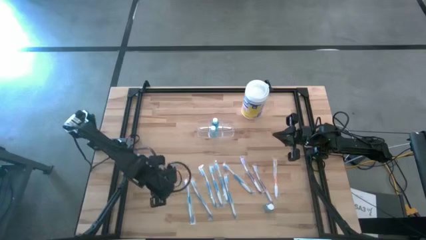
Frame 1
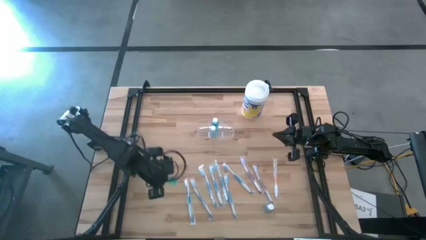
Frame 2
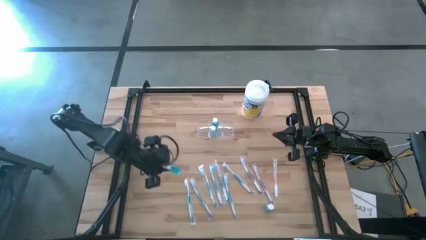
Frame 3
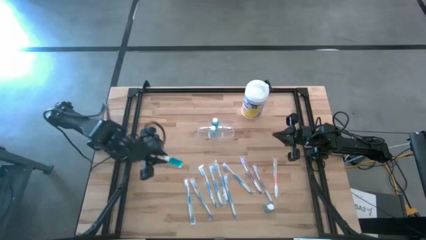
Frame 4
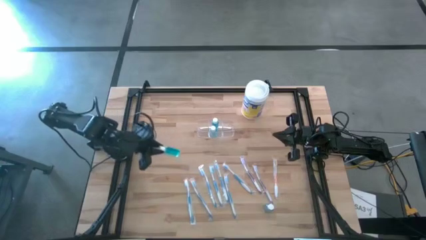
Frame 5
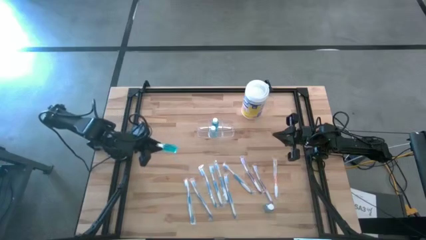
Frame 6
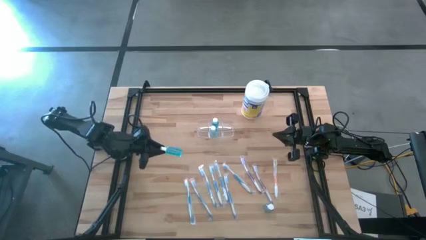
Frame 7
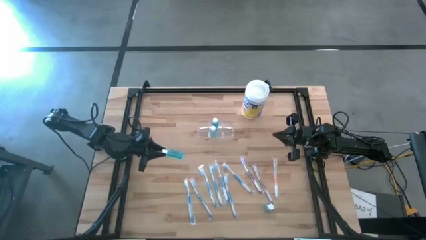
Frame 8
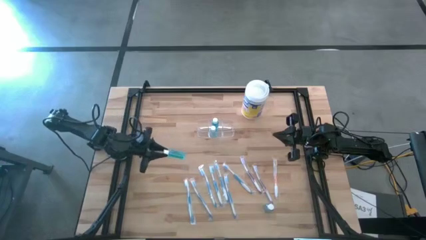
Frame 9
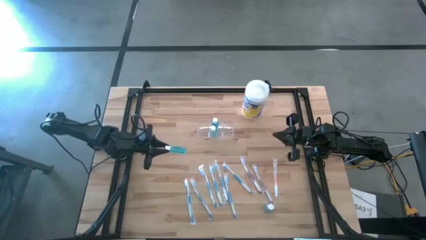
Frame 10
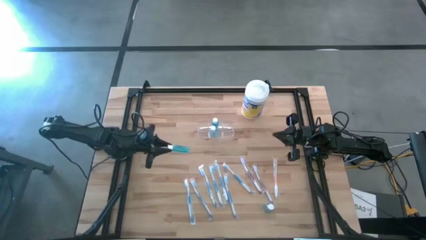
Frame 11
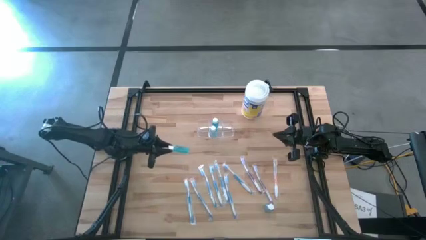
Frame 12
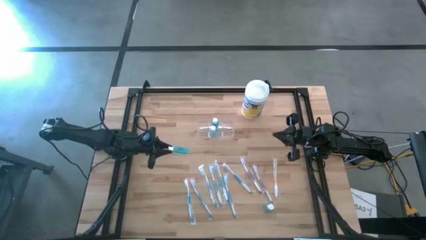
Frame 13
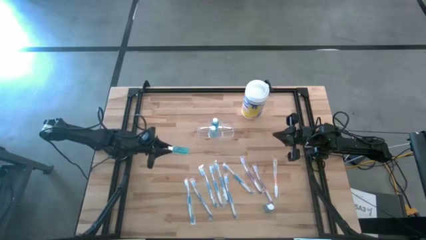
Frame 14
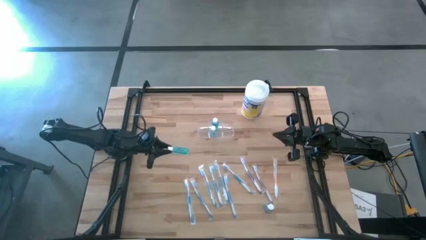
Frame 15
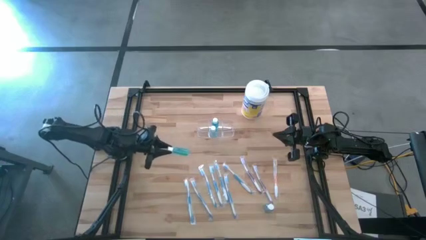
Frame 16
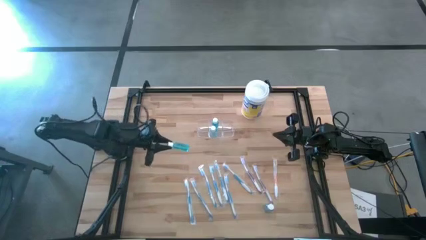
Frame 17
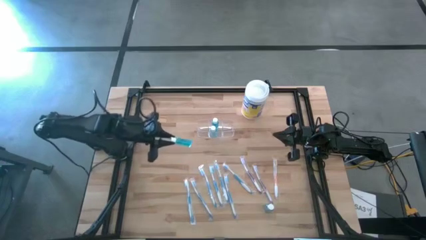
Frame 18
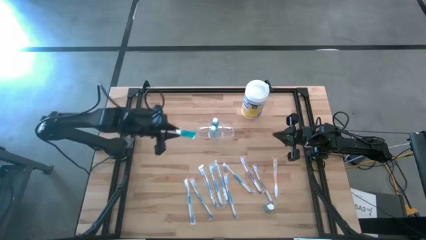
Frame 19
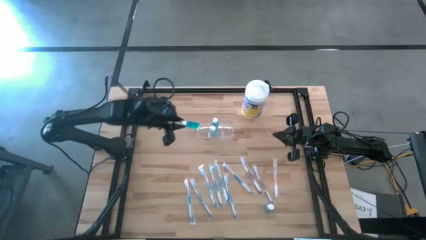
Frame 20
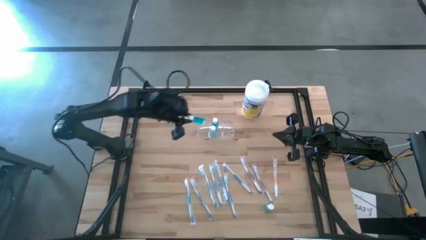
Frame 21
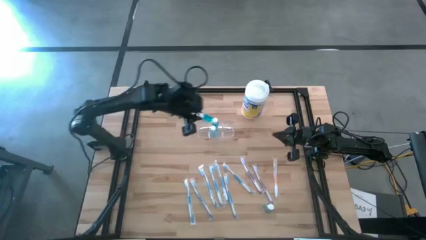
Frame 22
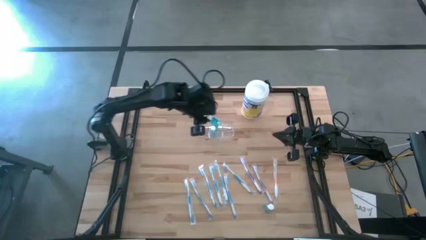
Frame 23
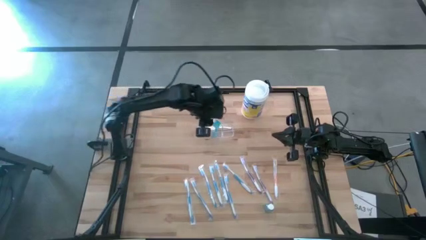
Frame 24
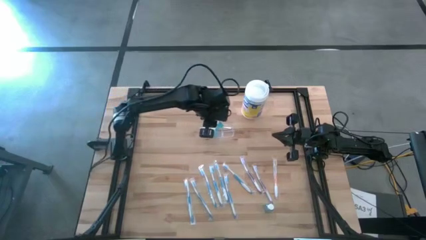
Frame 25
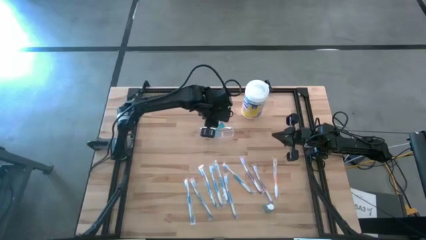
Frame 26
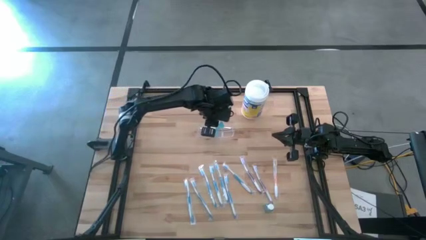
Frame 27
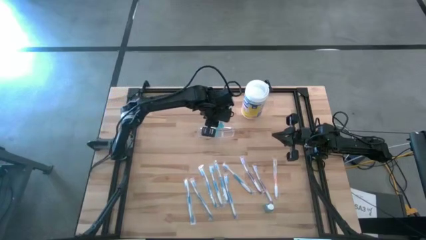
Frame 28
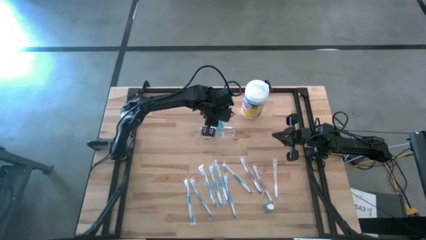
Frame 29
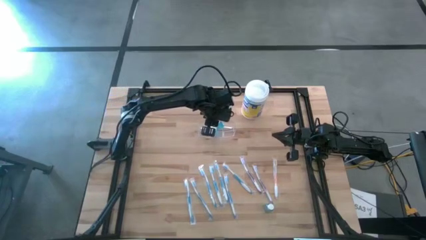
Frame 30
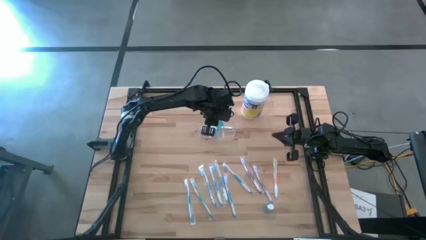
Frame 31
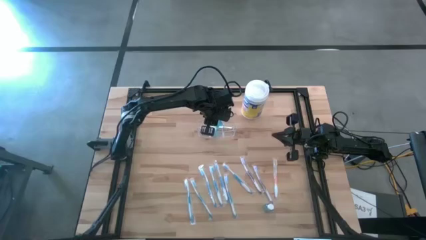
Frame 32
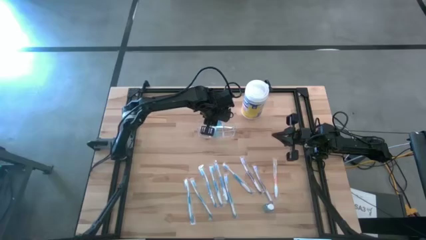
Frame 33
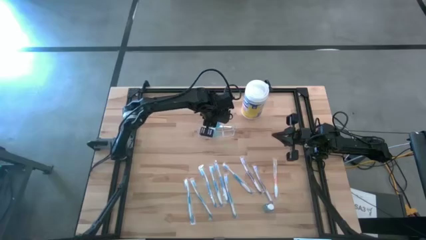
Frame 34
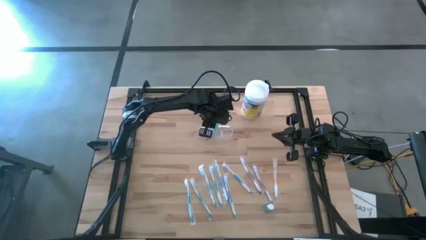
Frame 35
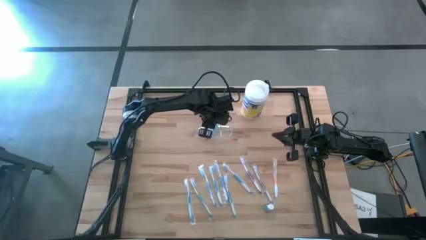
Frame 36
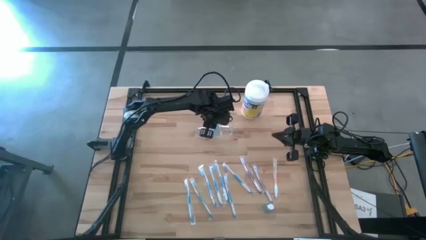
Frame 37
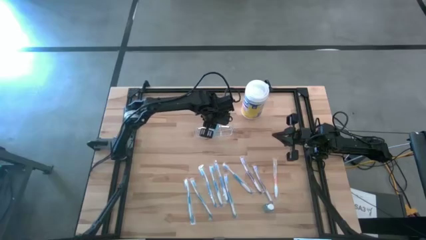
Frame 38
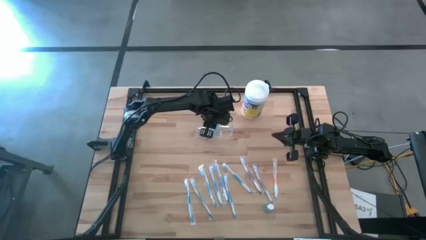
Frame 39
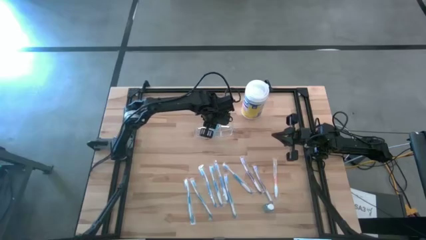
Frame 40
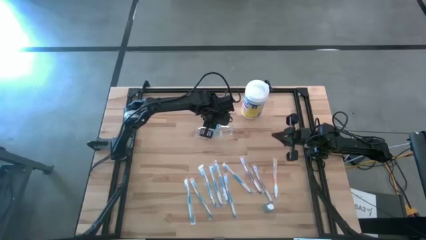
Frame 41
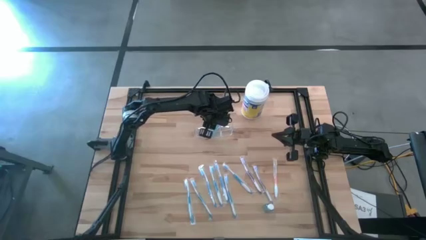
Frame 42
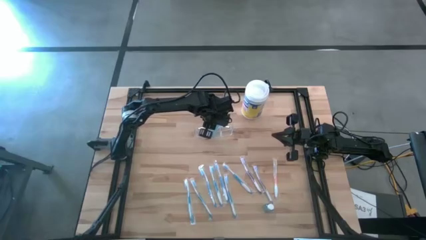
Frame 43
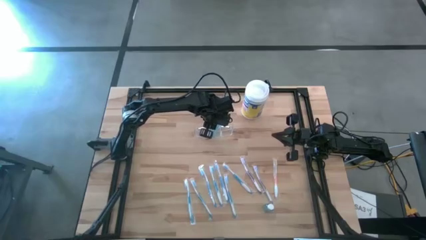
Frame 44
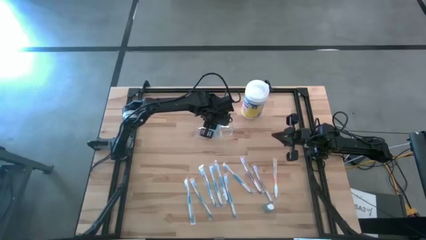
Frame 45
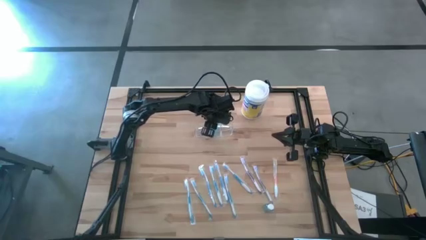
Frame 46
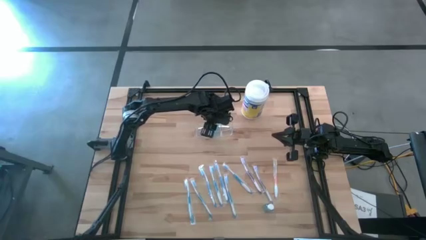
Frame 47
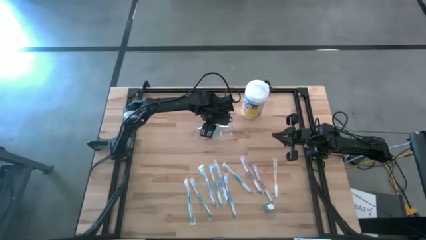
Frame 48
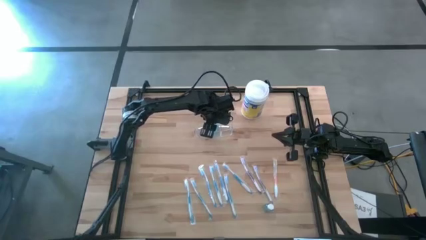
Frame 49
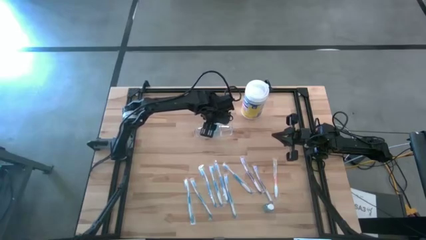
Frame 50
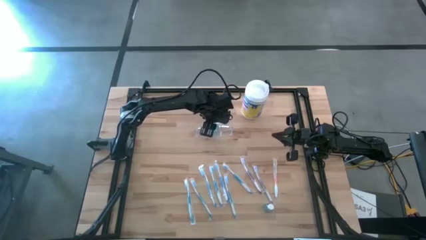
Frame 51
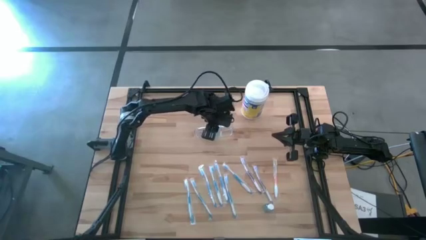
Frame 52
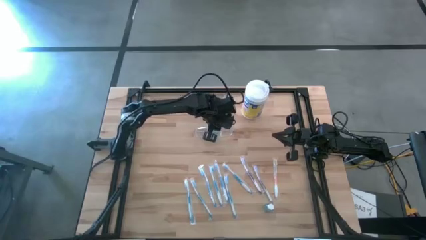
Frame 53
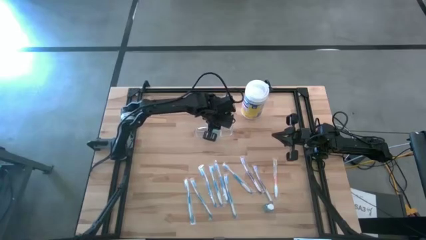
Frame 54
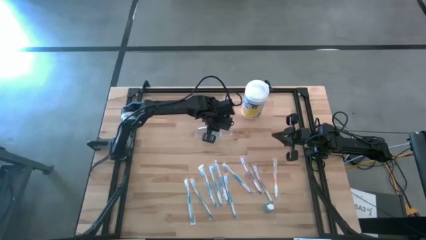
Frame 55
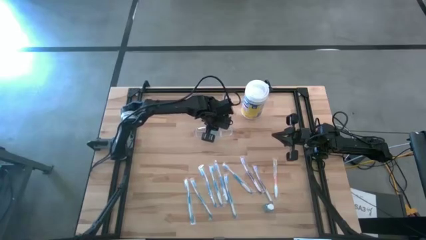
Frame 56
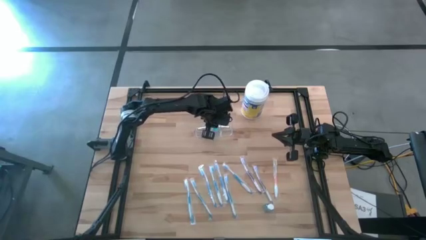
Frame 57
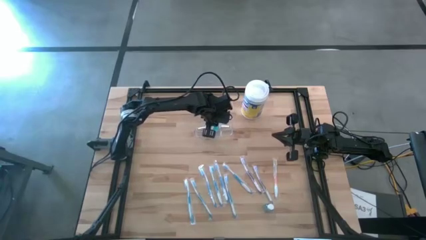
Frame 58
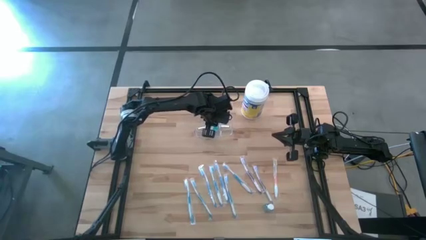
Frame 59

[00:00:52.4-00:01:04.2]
Task: Pick & Place toothbrushing station
Put the blue mouthwash bottle into the transparent organizer
